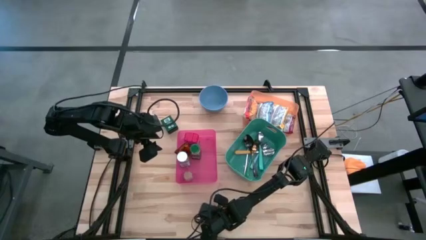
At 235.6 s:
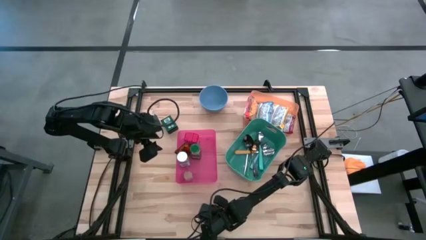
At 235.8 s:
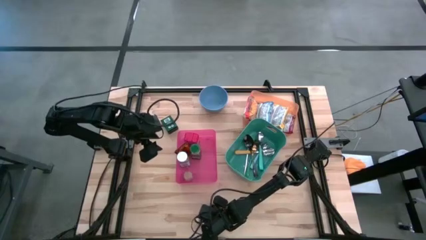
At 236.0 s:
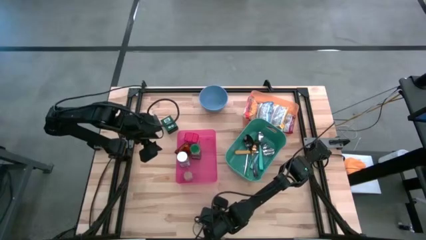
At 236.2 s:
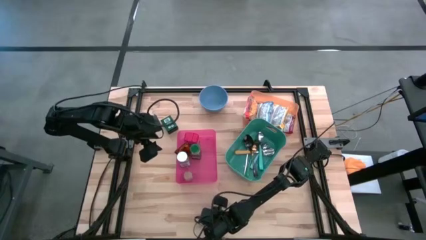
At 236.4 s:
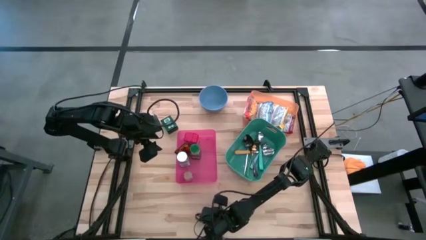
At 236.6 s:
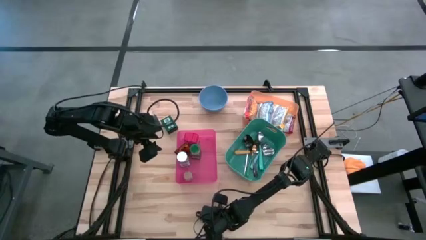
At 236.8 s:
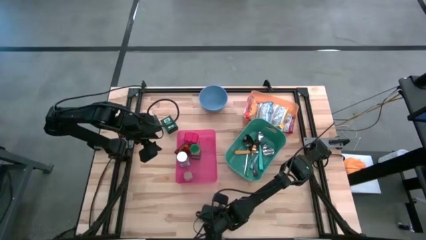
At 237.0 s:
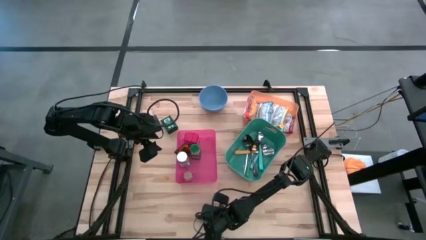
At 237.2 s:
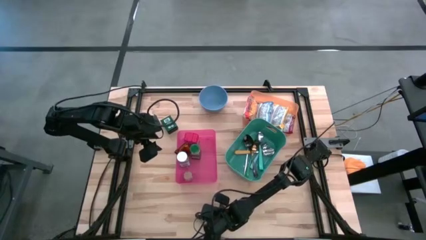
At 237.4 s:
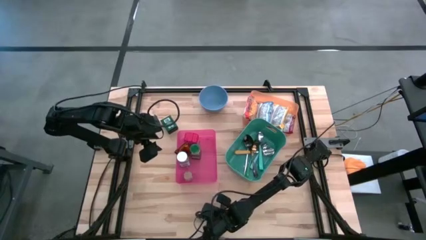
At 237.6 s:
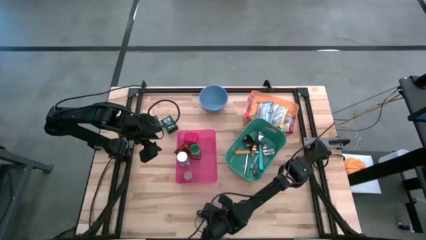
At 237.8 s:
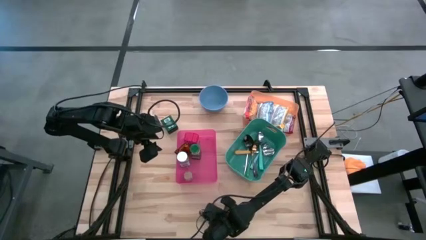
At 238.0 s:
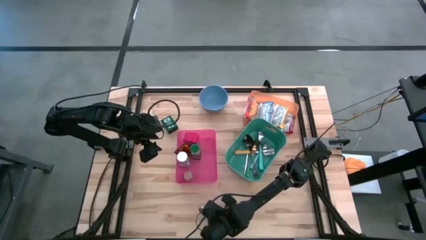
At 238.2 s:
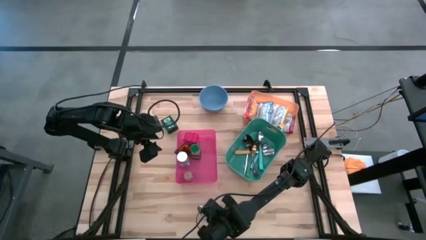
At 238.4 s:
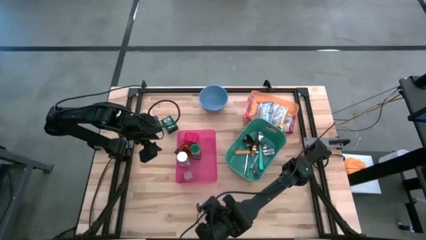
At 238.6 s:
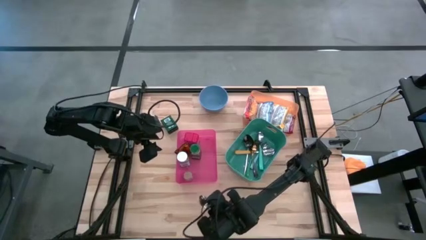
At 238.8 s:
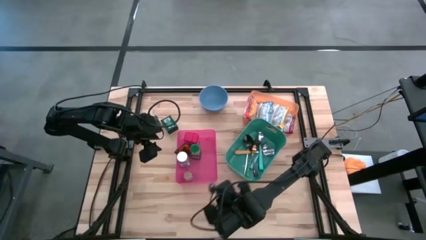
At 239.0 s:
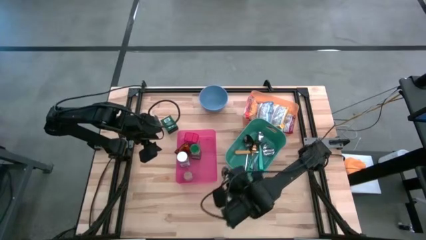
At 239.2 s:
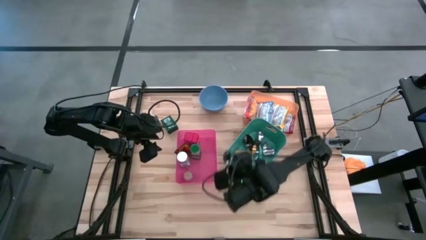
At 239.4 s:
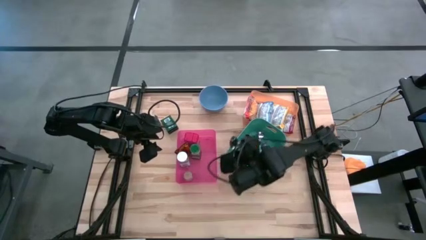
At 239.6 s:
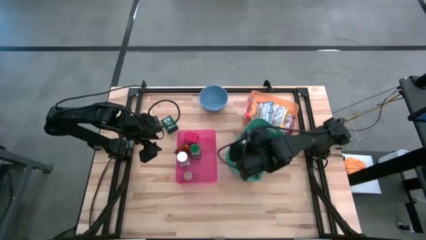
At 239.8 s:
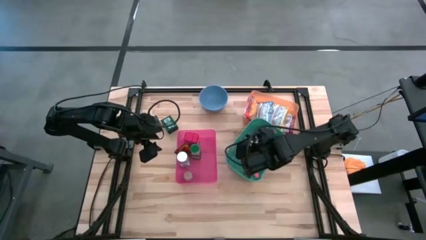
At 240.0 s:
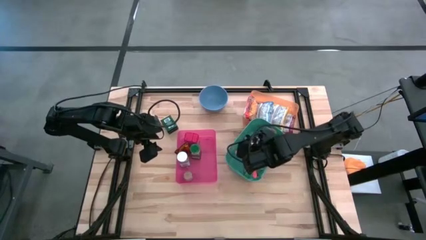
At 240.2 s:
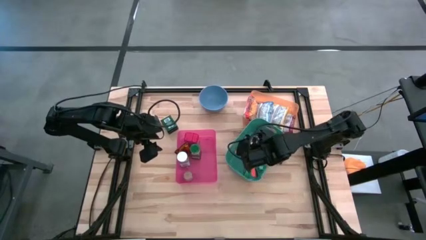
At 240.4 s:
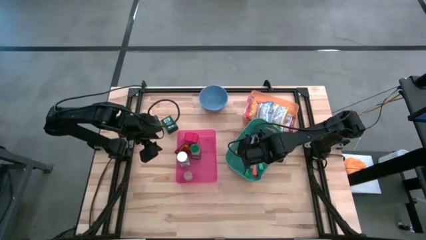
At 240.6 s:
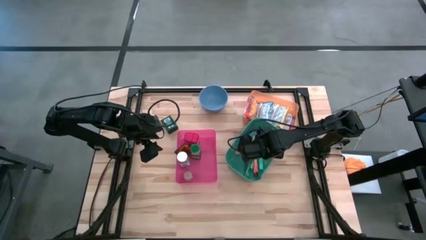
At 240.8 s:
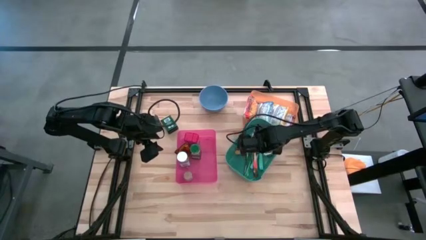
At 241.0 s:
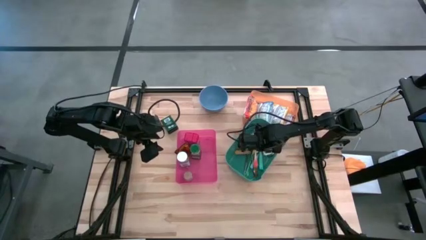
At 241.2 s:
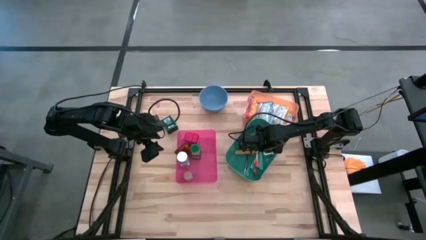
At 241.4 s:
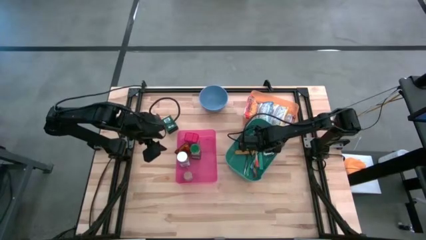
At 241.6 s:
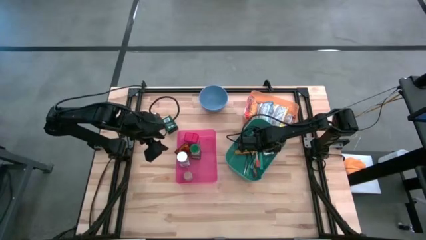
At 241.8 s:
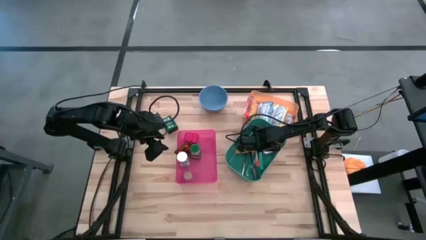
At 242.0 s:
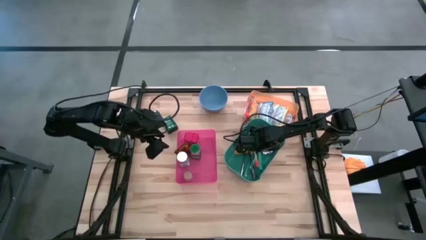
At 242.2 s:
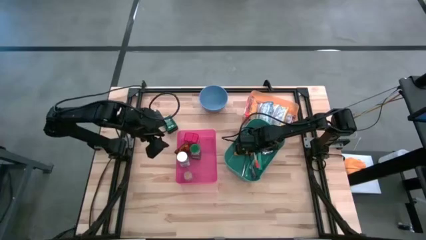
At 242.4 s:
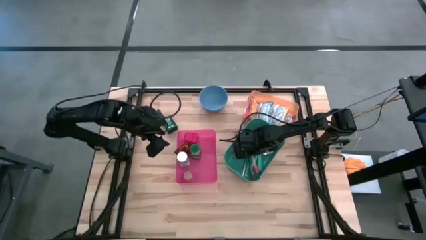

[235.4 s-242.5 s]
Put the white and orange spoon into the green bin

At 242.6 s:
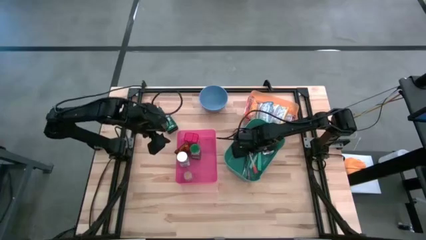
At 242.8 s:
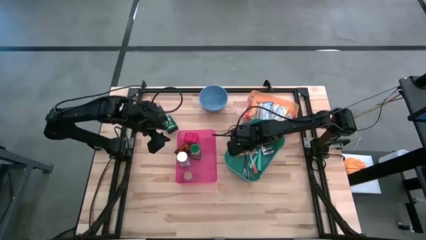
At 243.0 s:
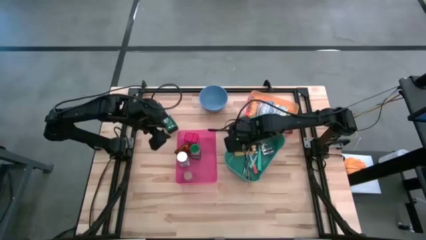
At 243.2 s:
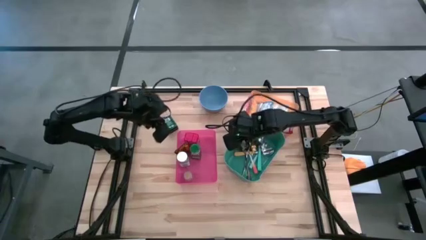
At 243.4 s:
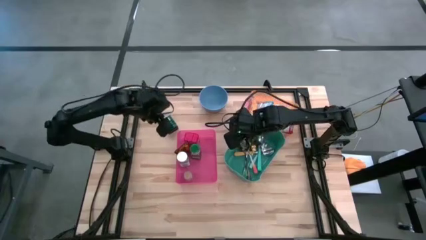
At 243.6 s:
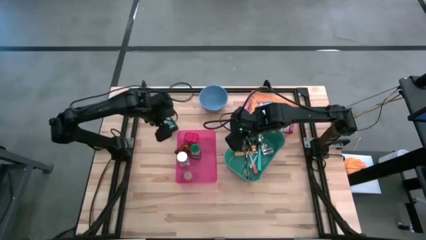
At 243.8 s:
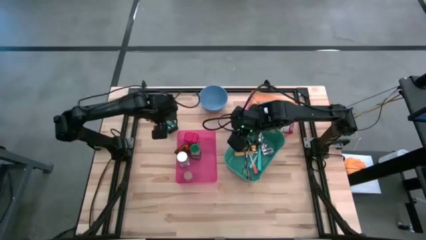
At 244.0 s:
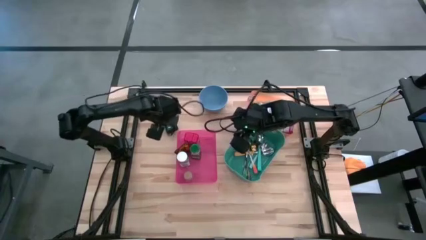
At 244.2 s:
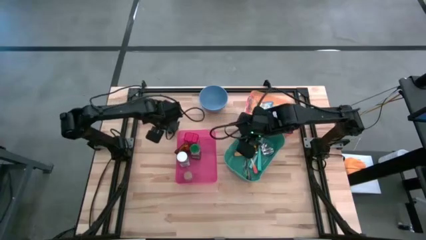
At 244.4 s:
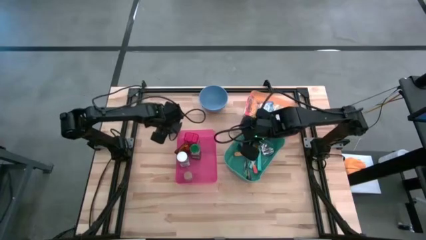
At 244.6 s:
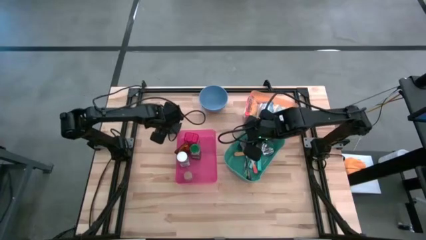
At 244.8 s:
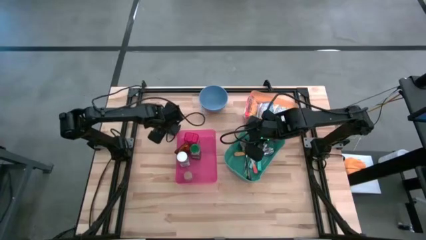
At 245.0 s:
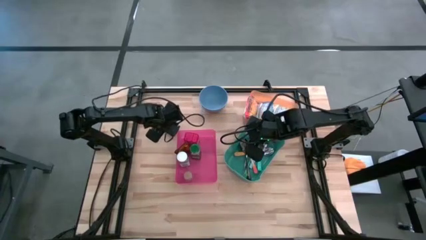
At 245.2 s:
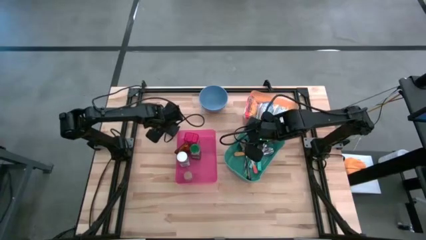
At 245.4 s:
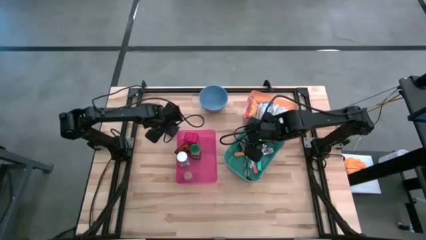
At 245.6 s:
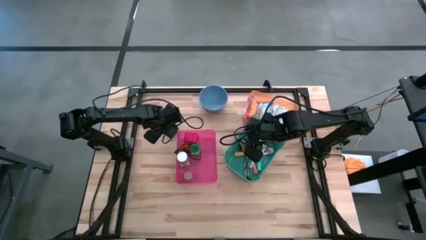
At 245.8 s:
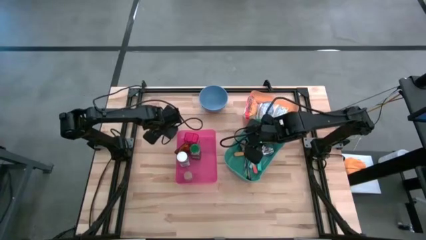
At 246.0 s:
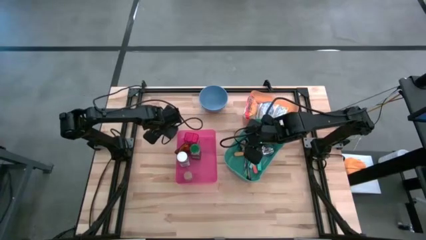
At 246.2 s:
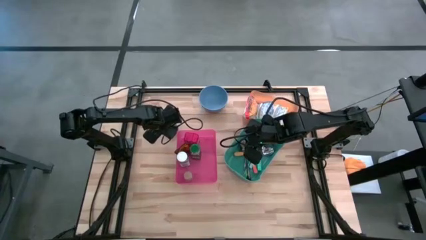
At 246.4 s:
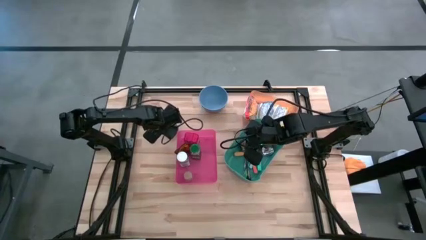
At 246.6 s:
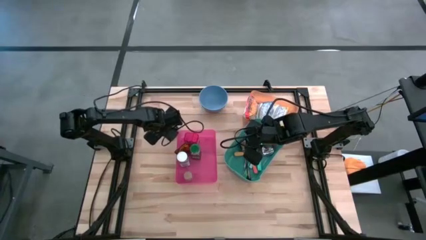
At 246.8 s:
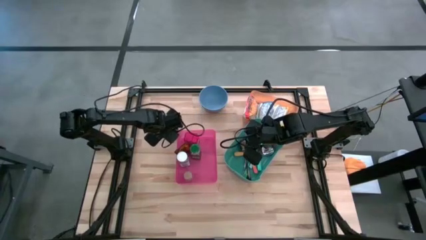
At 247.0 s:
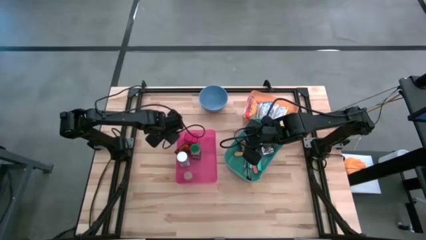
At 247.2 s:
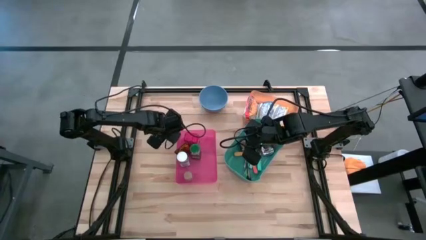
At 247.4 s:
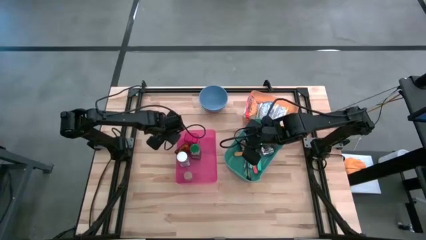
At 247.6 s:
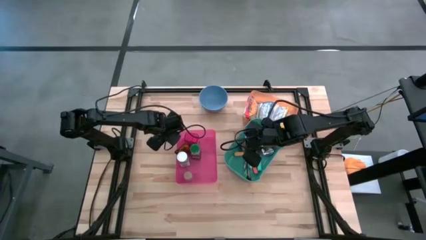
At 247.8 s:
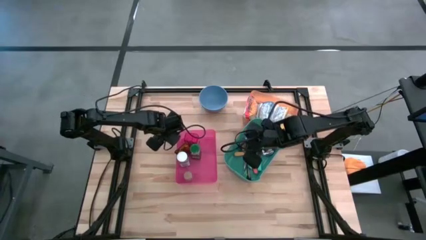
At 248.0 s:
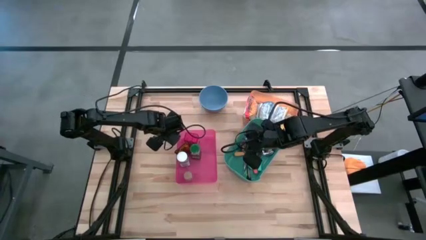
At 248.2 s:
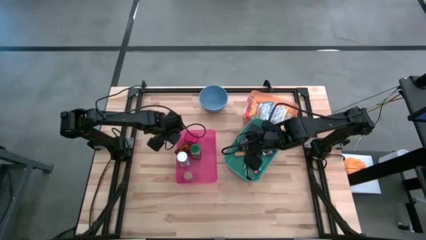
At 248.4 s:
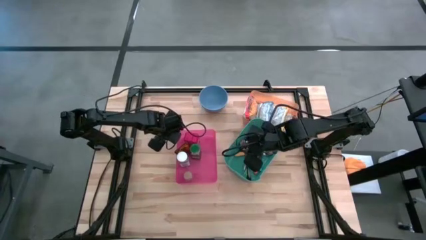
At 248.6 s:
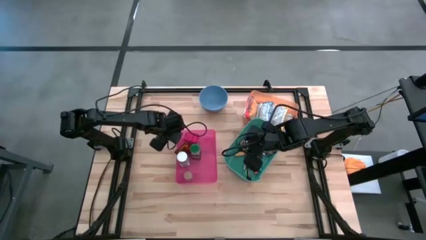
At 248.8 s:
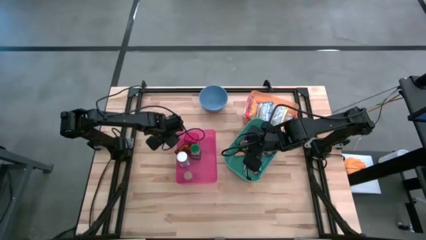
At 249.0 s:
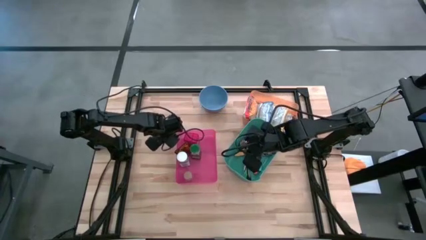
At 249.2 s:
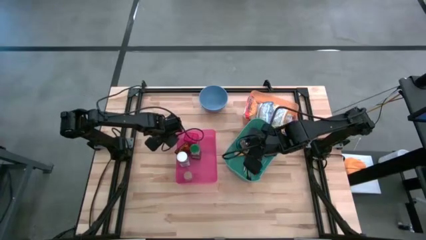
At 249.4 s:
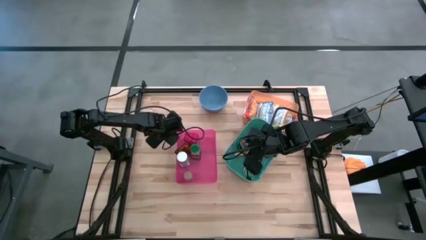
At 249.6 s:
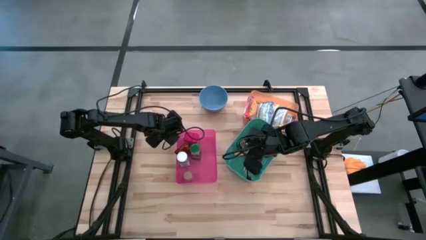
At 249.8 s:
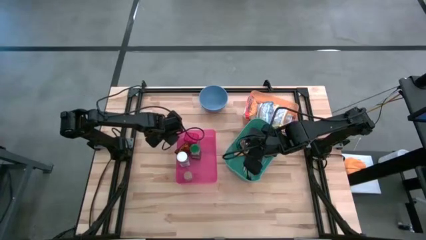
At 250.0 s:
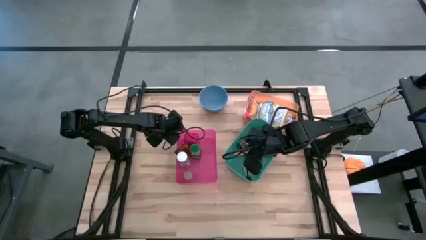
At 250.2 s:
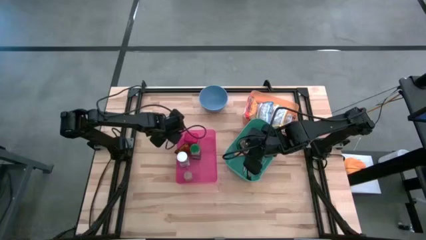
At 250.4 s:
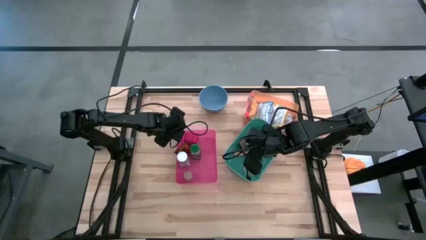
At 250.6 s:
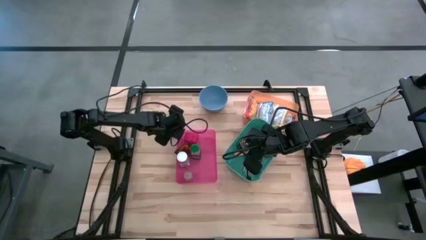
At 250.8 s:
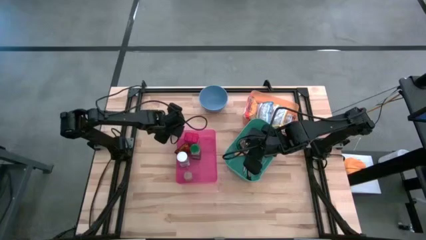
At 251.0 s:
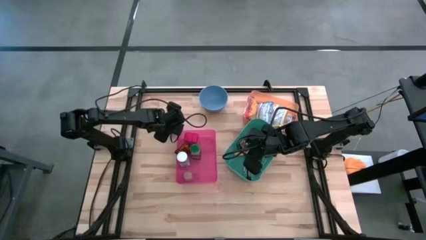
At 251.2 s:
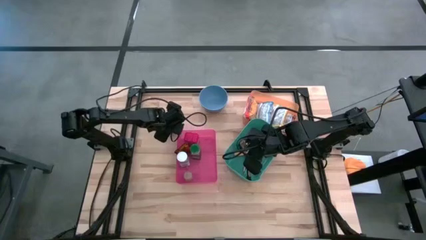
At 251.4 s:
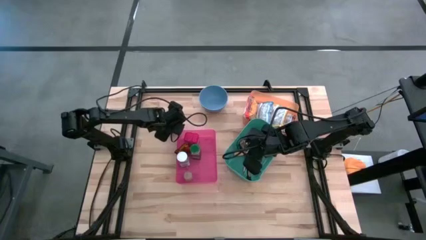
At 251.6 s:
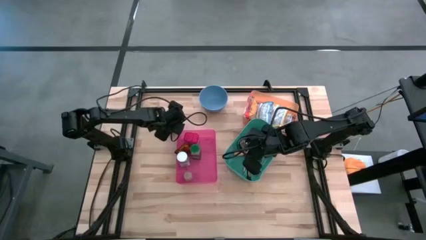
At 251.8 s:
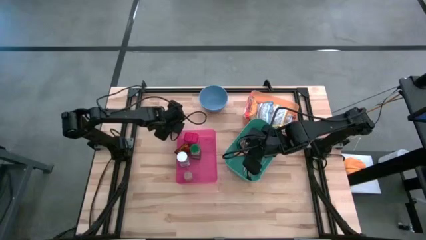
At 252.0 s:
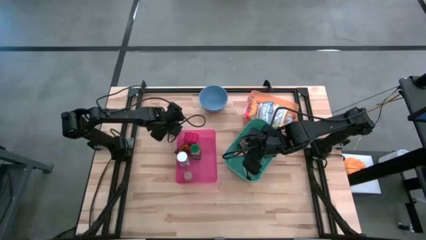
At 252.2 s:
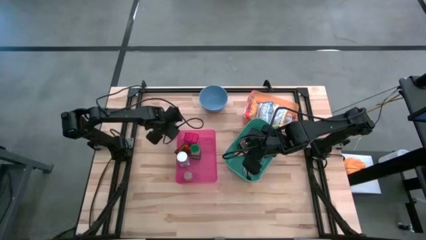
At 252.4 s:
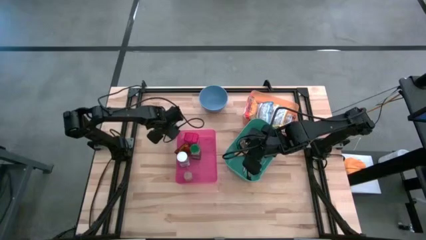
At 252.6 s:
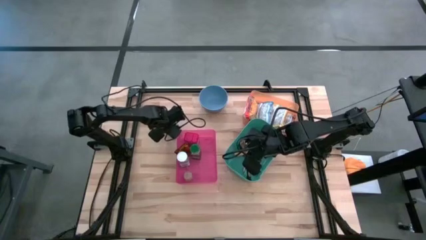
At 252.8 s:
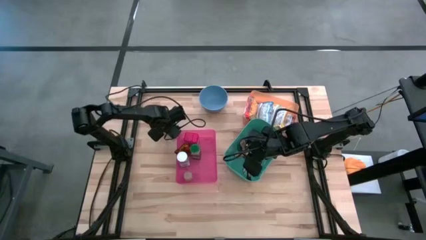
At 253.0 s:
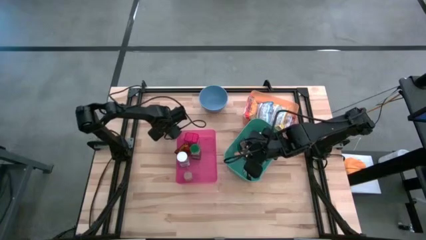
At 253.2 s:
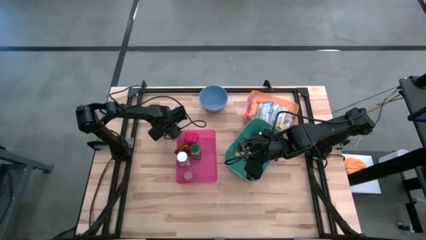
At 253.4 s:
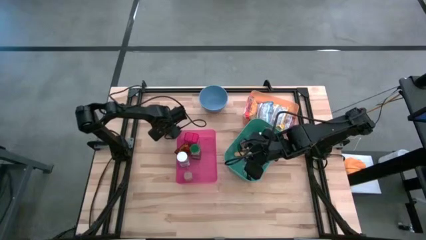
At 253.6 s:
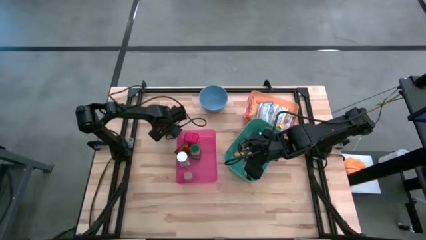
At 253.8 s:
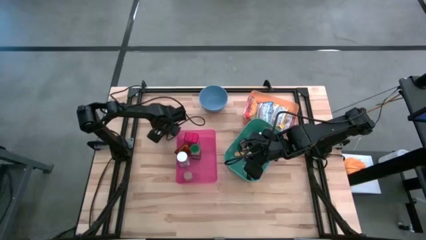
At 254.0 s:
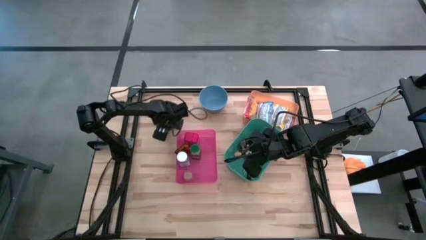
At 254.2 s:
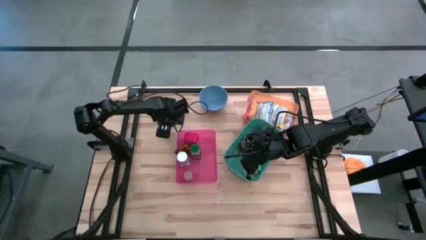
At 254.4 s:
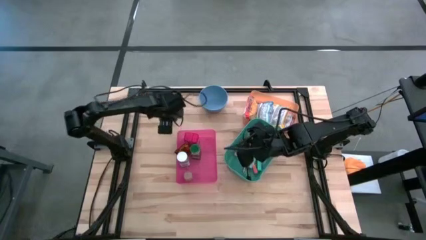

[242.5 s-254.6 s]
Put the black spice can into the red bin
